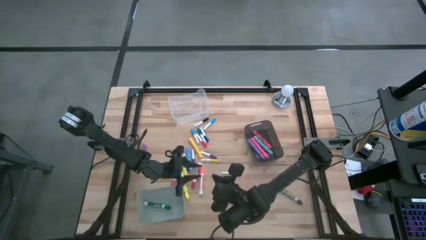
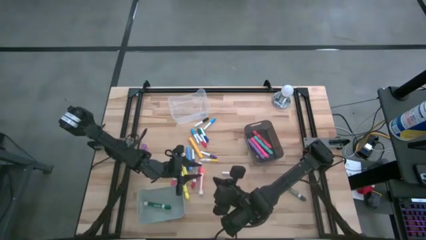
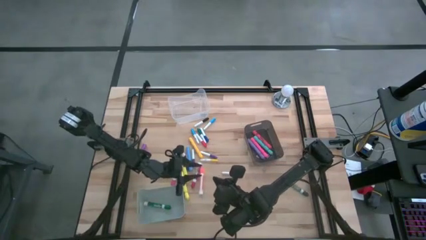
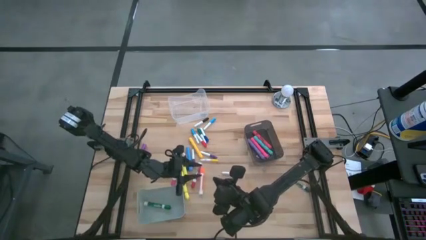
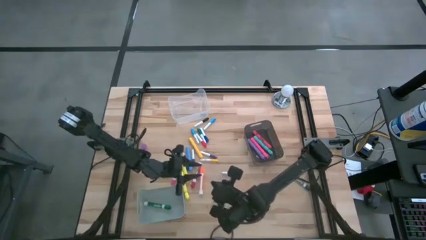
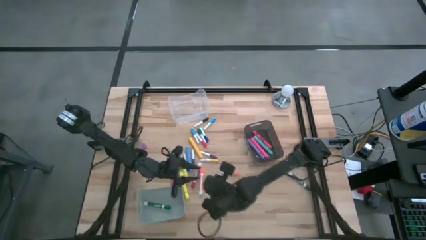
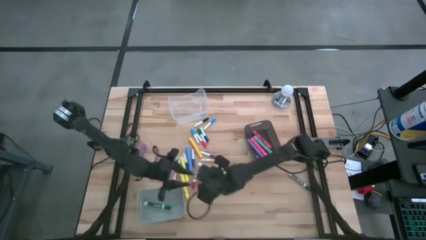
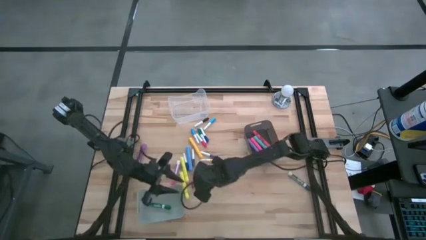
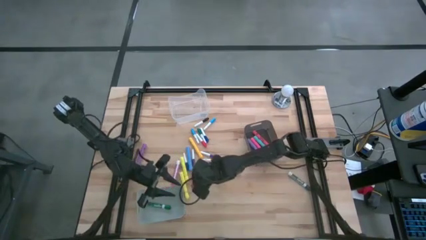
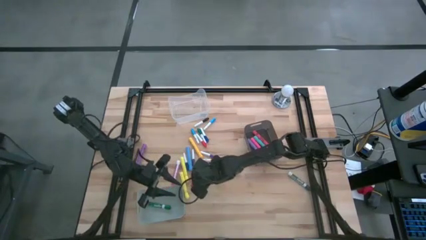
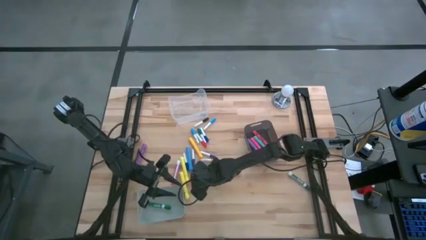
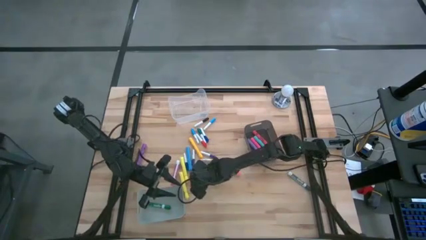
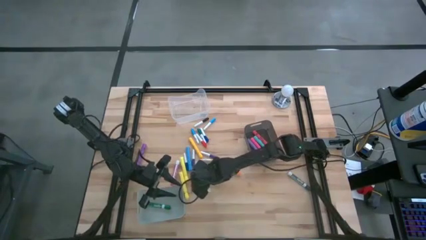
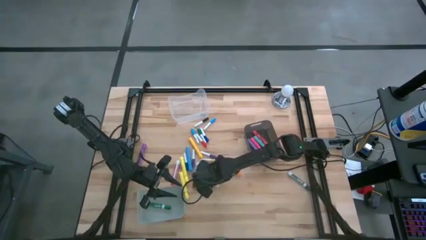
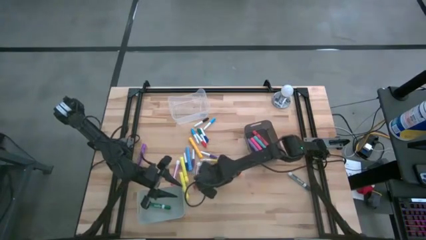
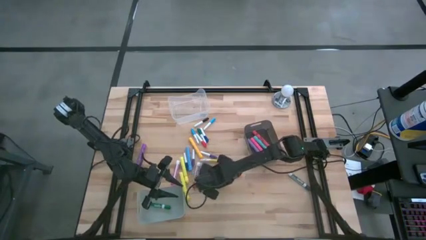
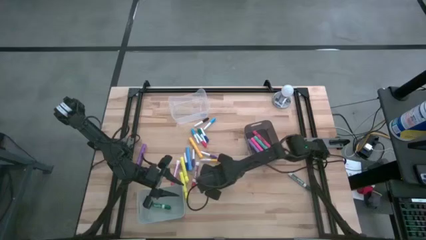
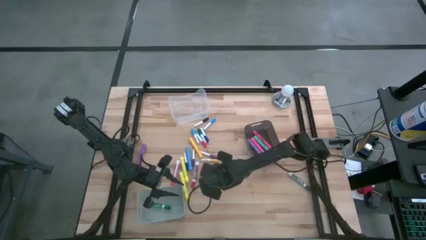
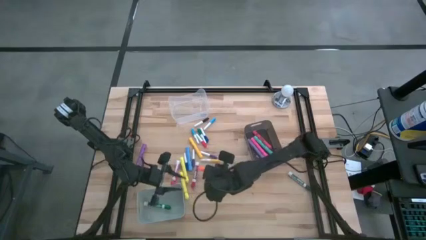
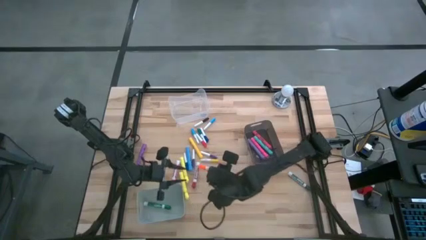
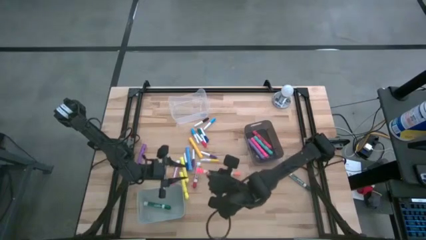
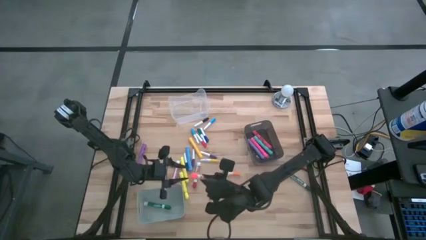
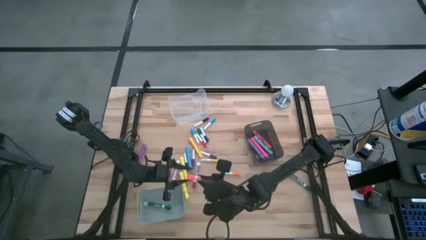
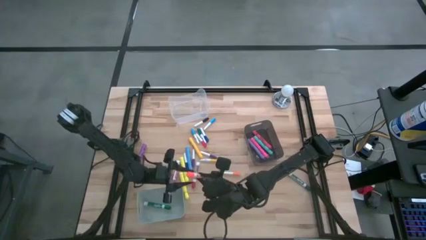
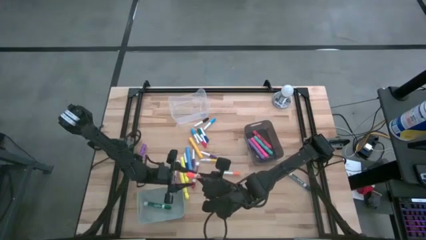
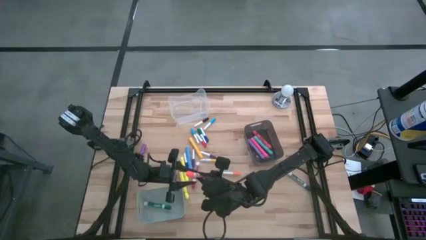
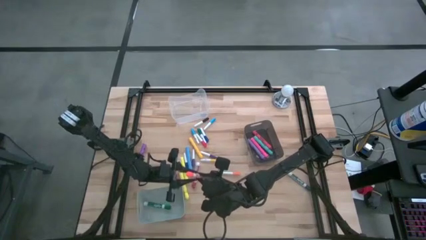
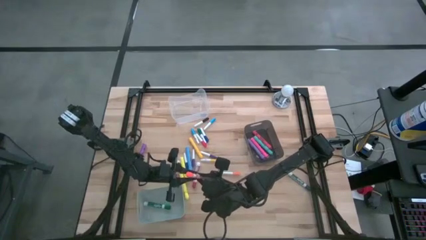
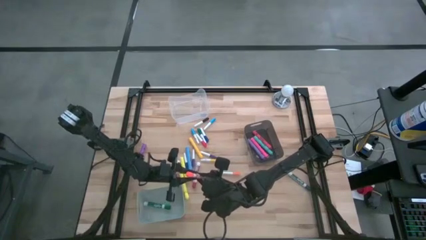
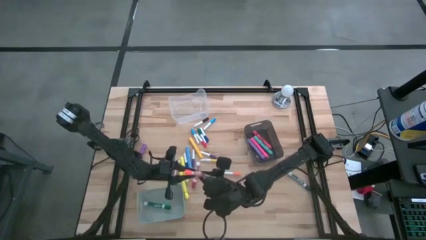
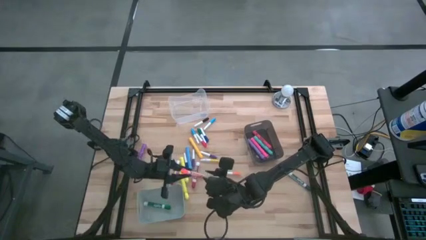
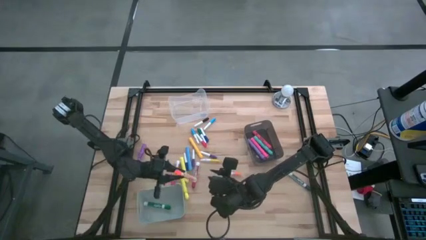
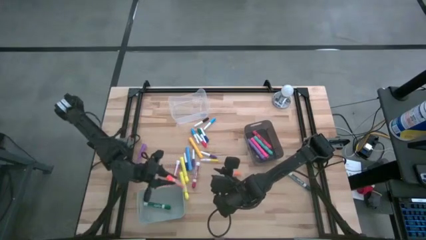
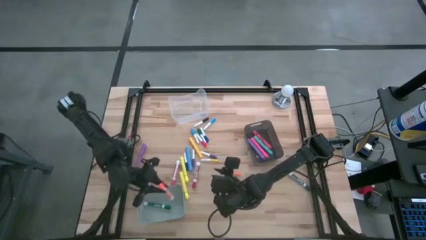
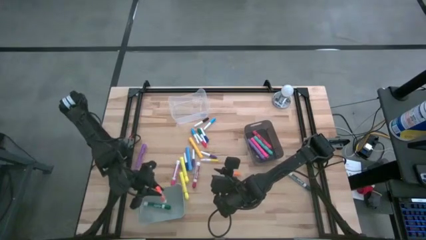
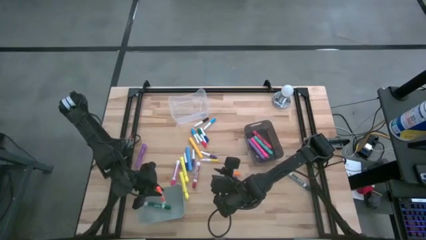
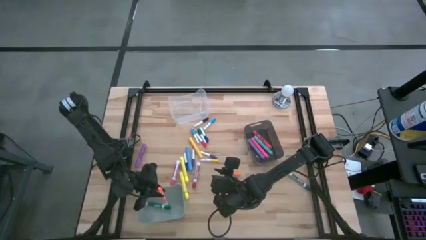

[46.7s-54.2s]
Task: Pick & Place Markers
Put the orange marker pen into the gray bin

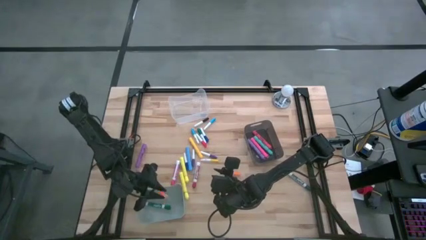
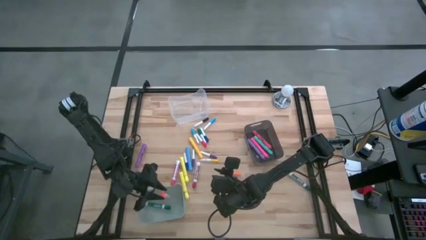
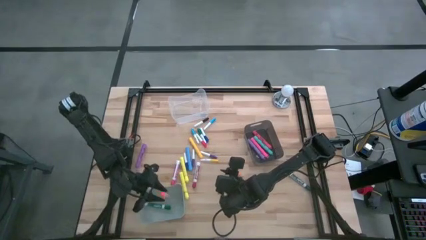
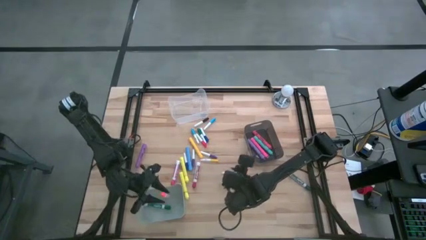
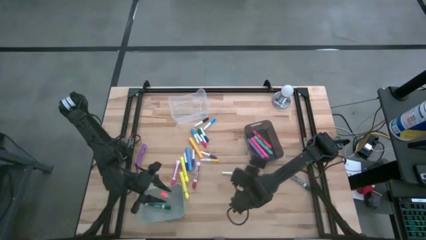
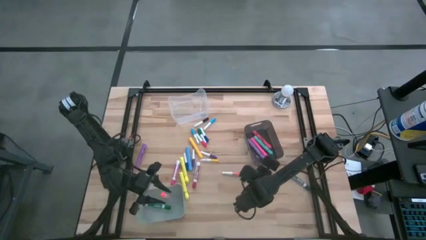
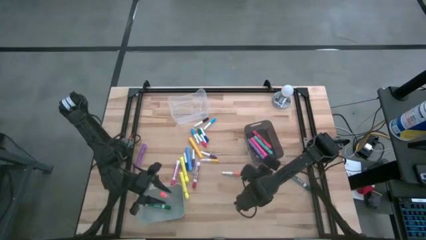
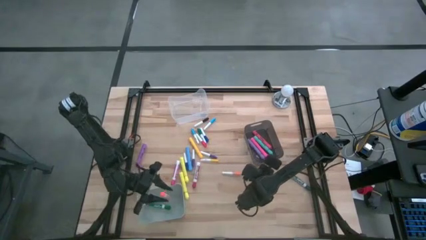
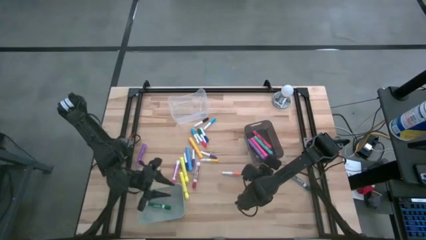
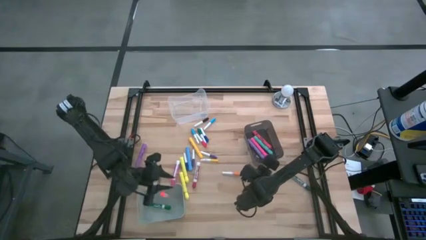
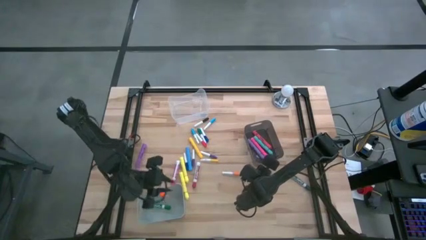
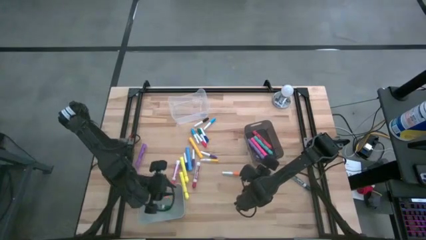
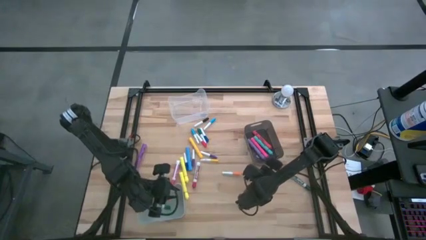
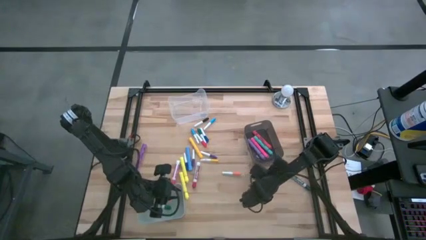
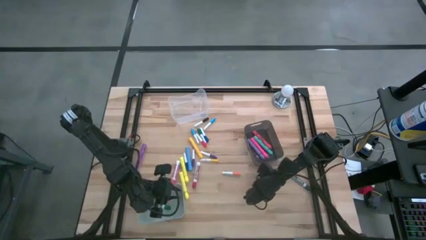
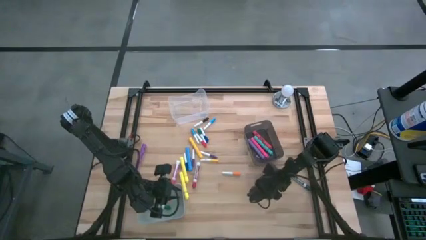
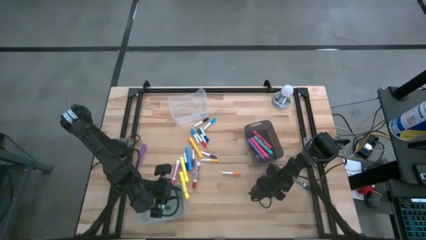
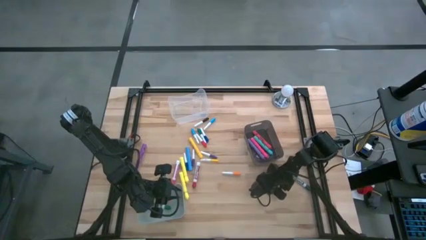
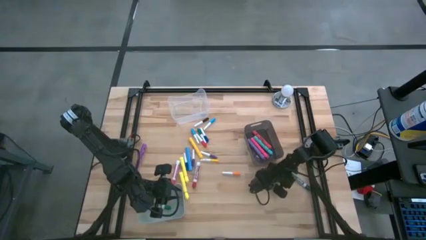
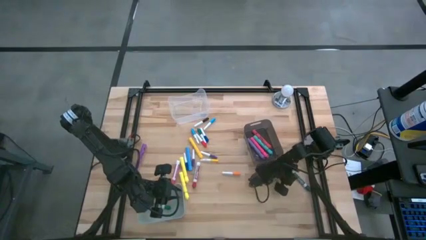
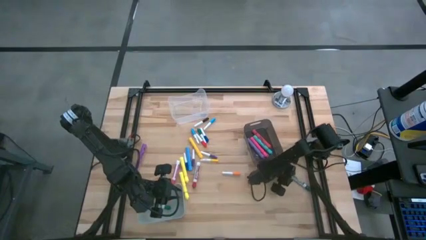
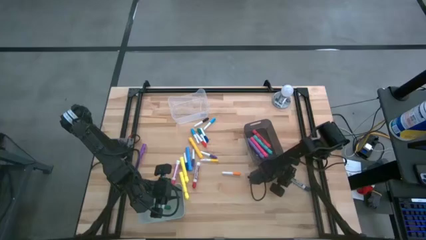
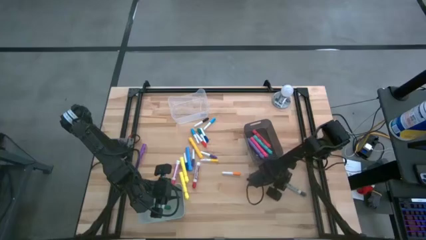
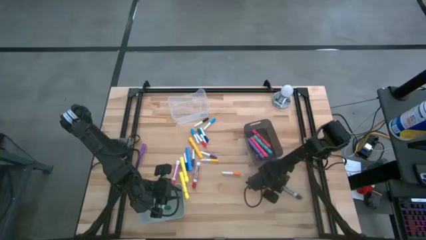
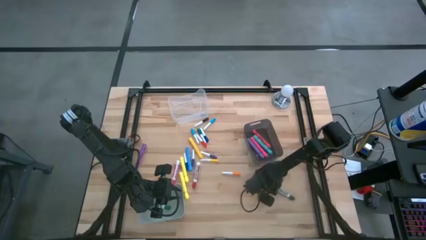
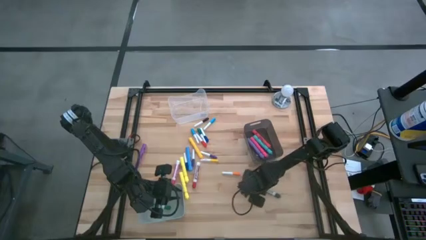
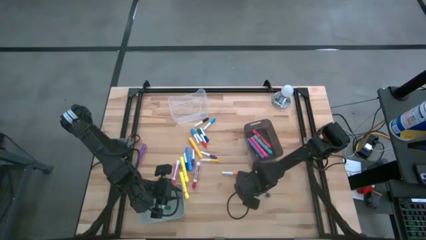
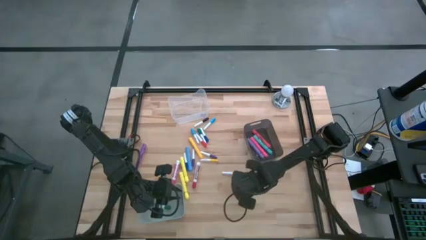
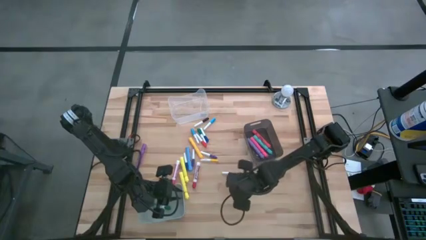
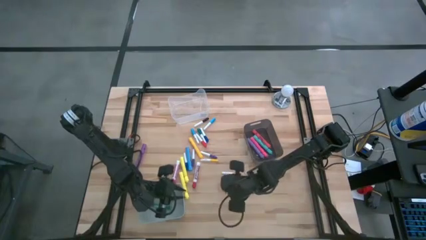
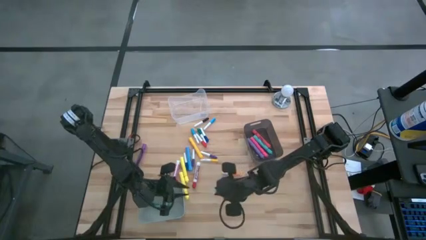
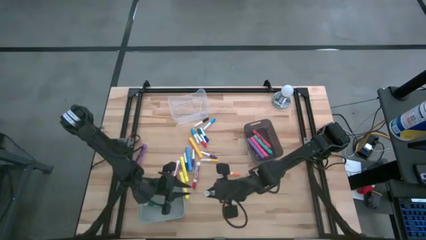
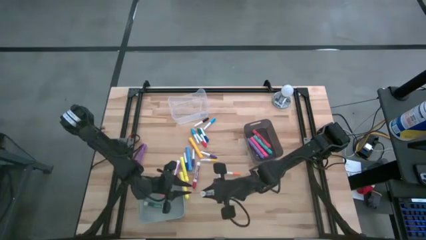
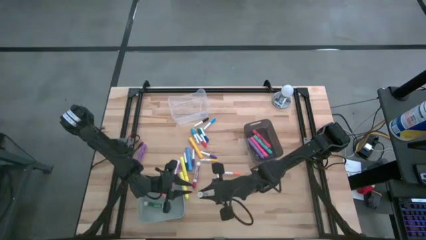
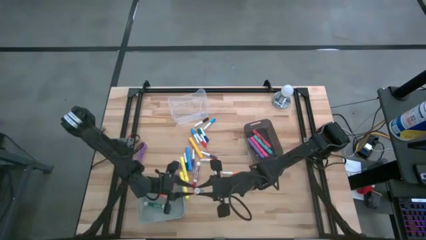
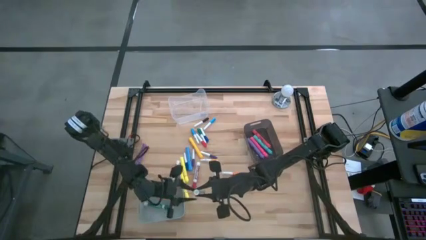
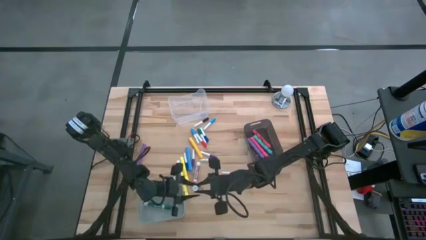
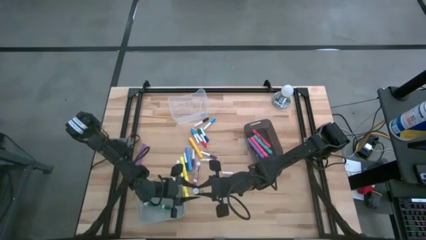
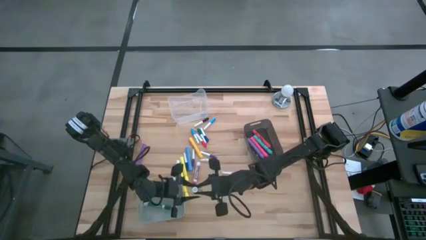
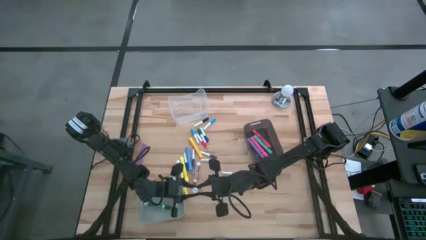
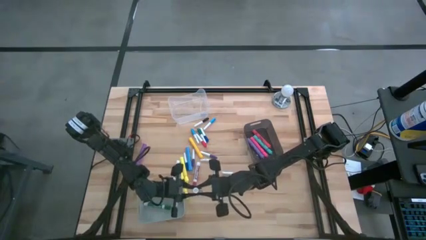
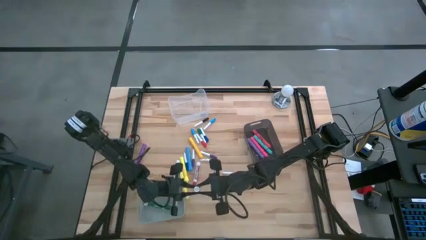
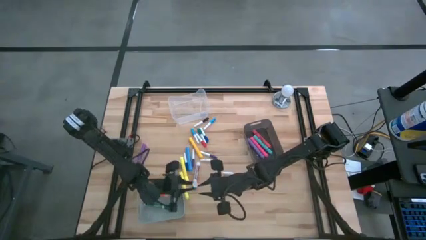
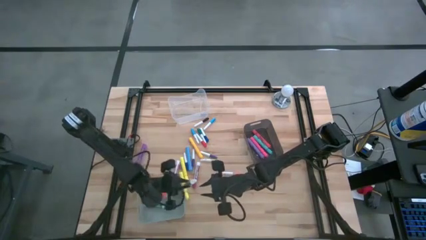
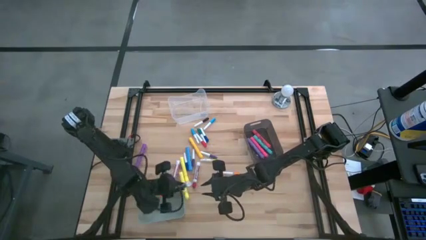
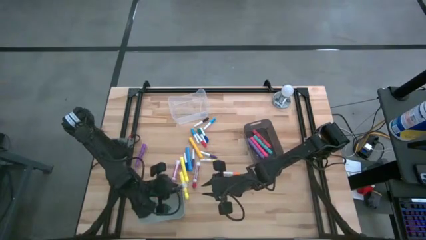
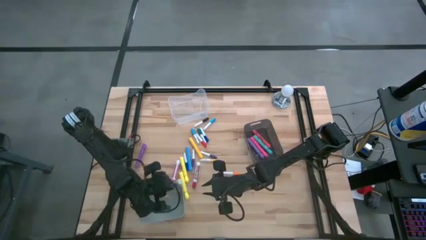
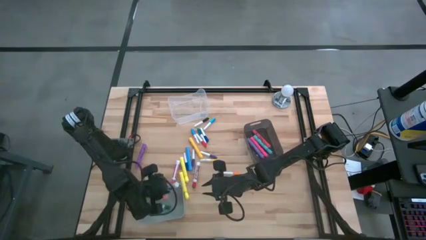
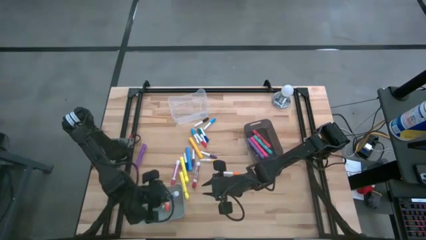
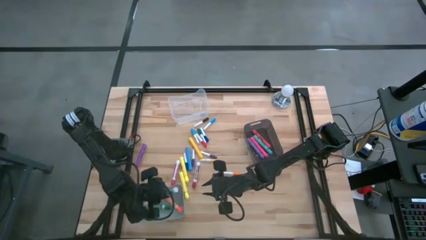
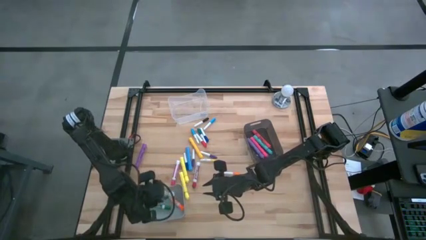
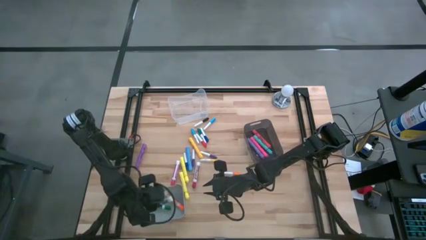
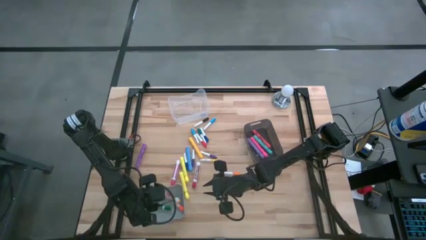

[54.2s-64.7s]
Put the green marker pen into the gray bin
